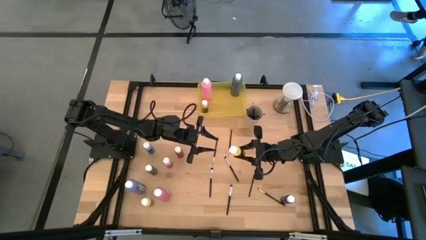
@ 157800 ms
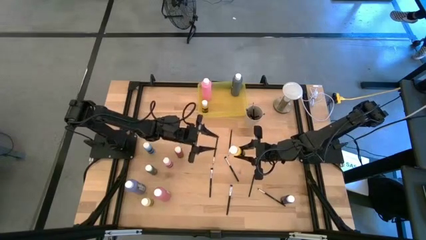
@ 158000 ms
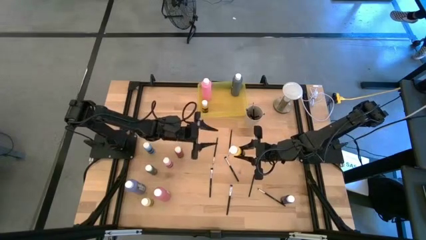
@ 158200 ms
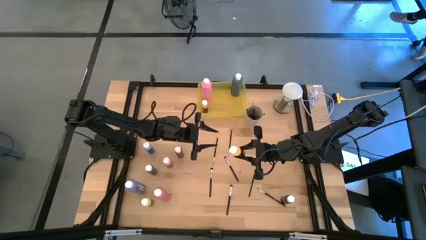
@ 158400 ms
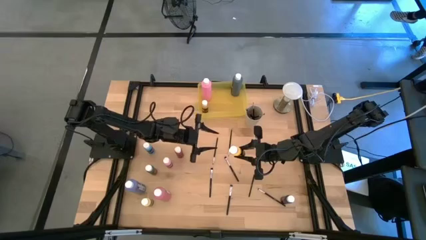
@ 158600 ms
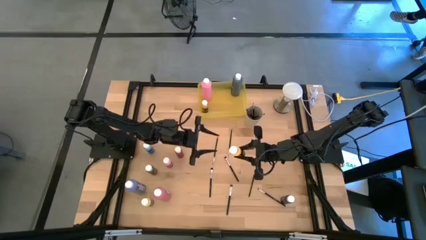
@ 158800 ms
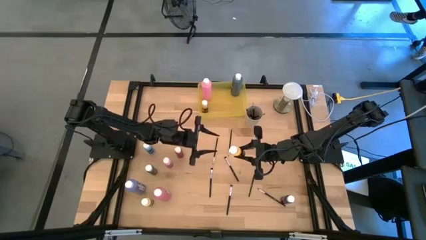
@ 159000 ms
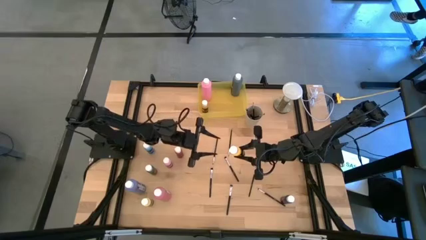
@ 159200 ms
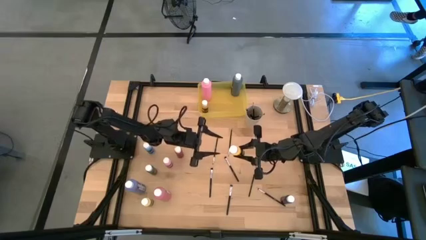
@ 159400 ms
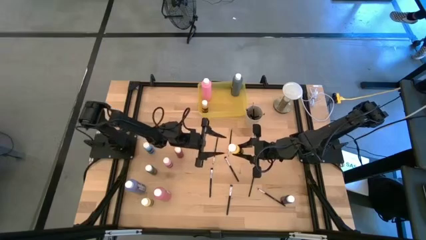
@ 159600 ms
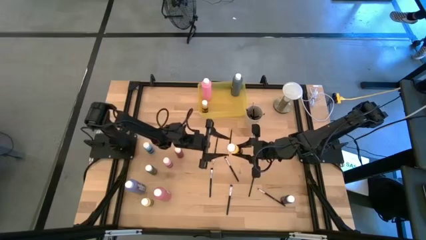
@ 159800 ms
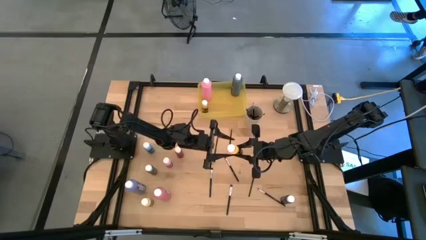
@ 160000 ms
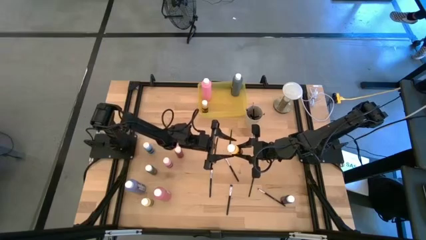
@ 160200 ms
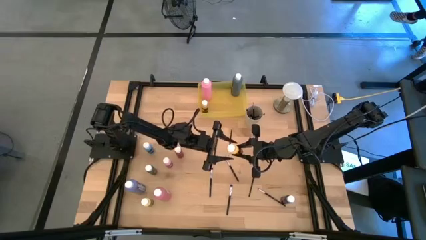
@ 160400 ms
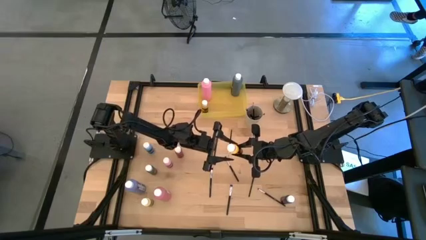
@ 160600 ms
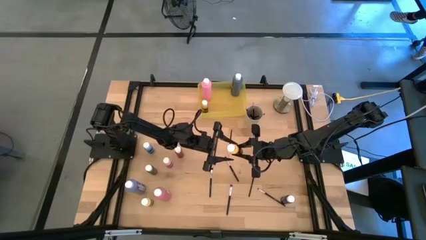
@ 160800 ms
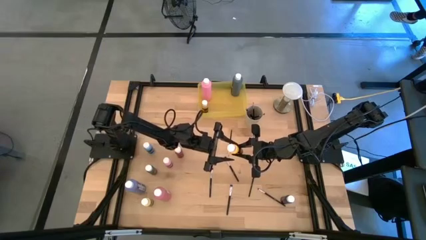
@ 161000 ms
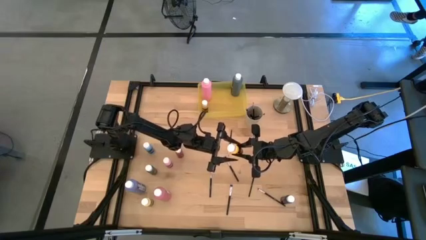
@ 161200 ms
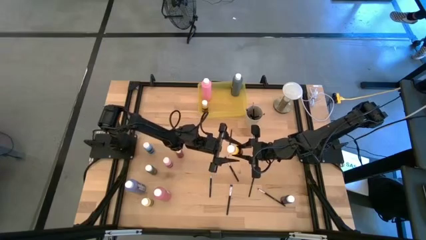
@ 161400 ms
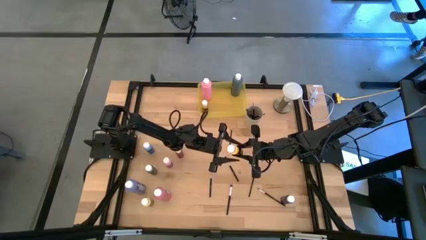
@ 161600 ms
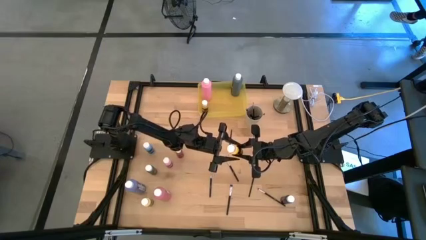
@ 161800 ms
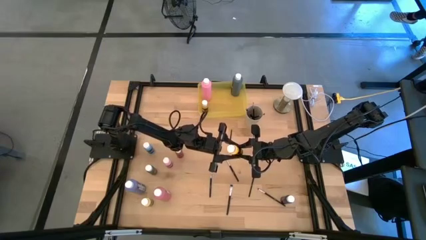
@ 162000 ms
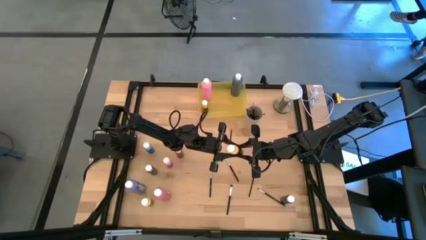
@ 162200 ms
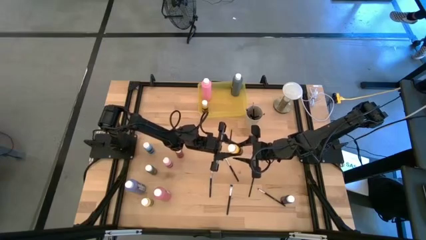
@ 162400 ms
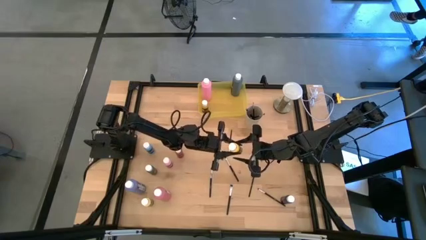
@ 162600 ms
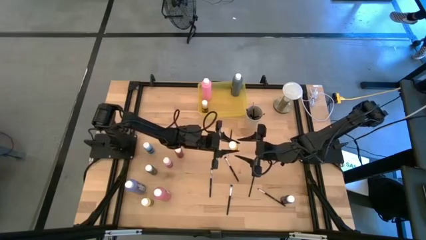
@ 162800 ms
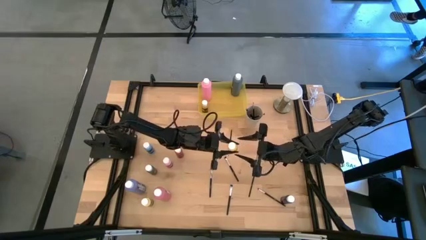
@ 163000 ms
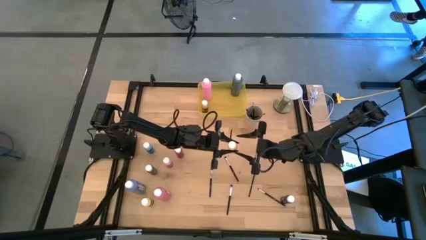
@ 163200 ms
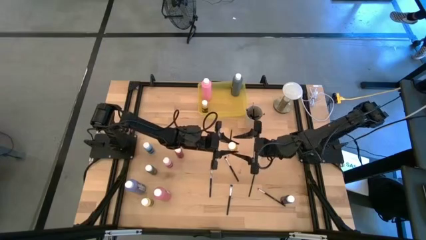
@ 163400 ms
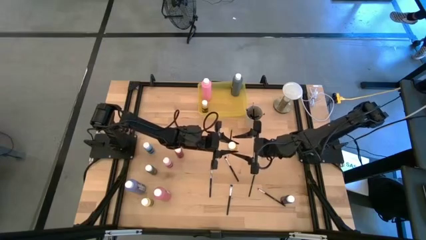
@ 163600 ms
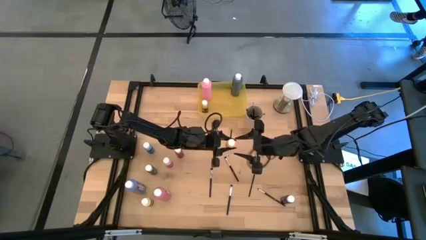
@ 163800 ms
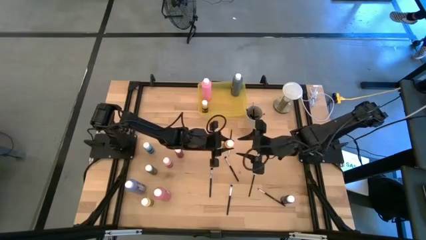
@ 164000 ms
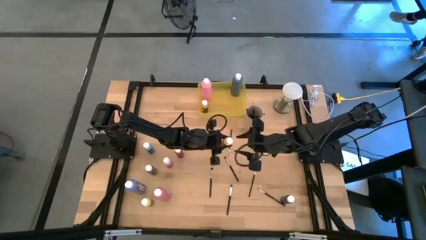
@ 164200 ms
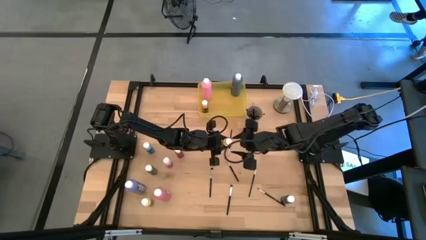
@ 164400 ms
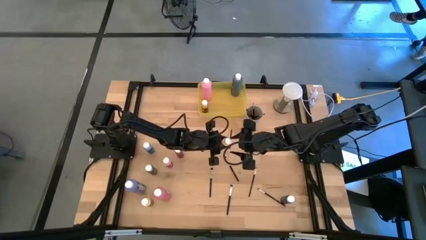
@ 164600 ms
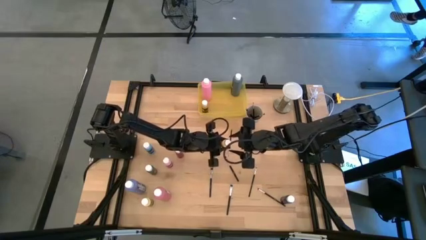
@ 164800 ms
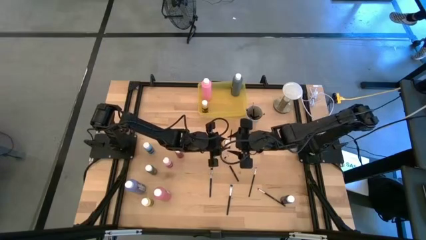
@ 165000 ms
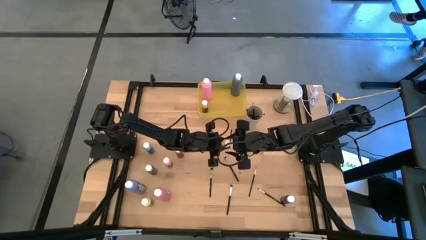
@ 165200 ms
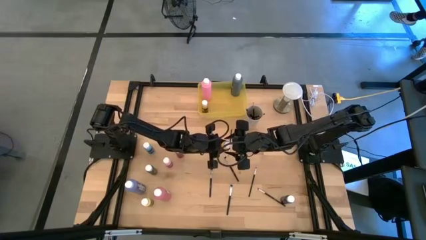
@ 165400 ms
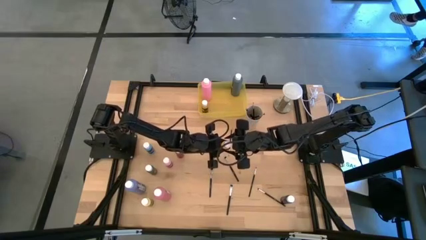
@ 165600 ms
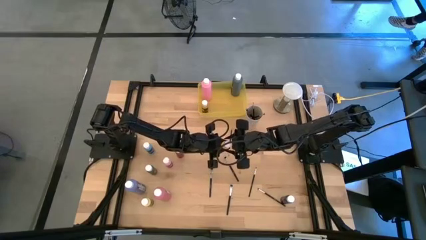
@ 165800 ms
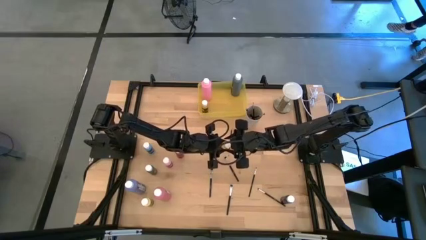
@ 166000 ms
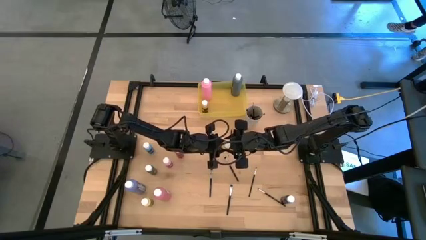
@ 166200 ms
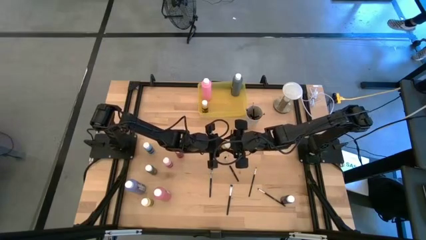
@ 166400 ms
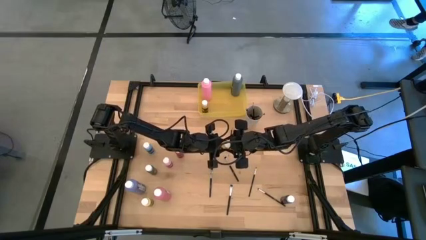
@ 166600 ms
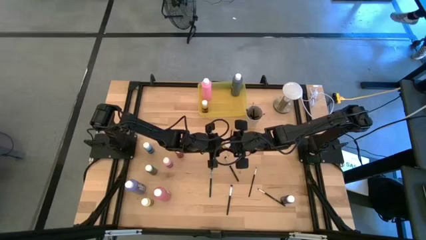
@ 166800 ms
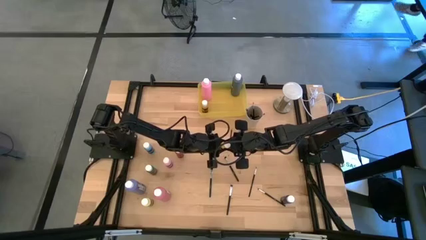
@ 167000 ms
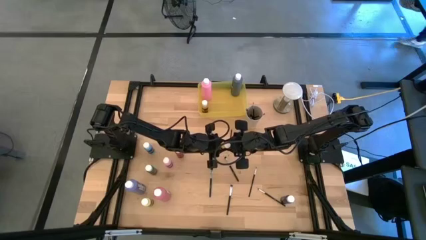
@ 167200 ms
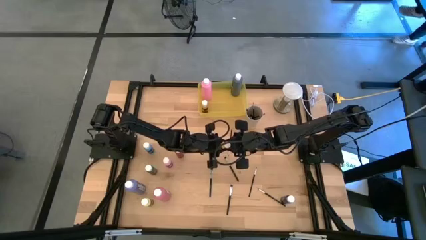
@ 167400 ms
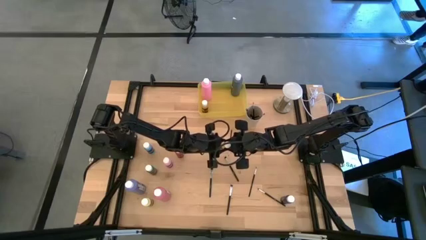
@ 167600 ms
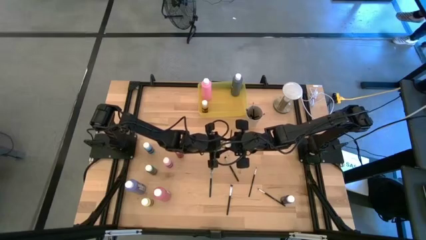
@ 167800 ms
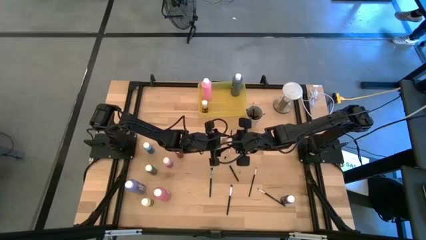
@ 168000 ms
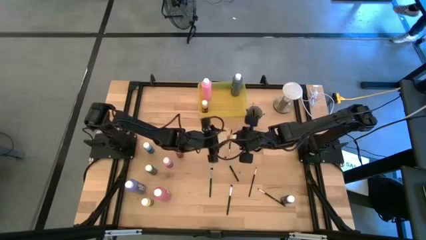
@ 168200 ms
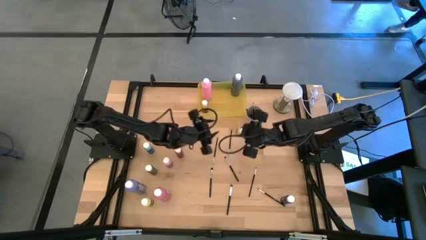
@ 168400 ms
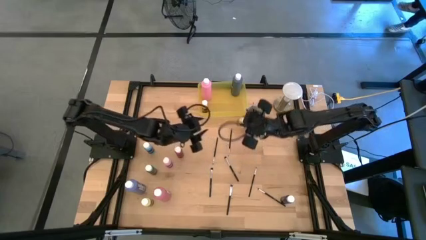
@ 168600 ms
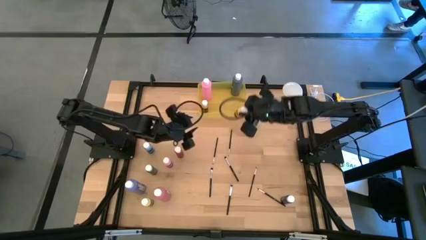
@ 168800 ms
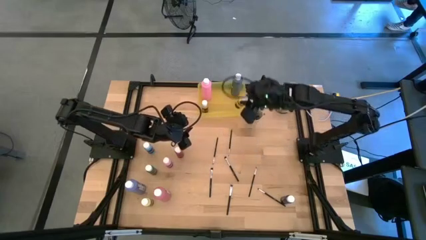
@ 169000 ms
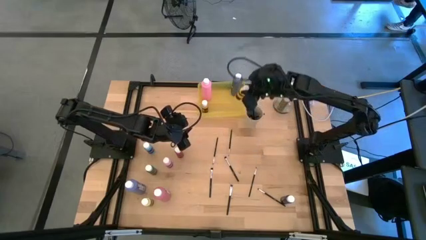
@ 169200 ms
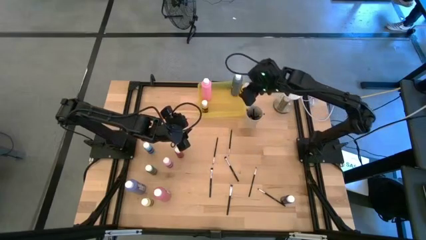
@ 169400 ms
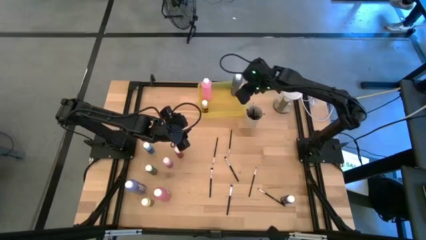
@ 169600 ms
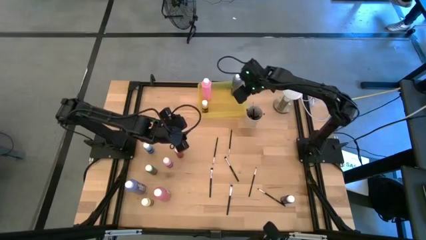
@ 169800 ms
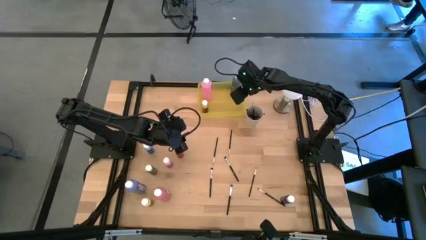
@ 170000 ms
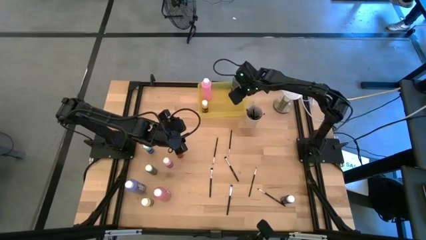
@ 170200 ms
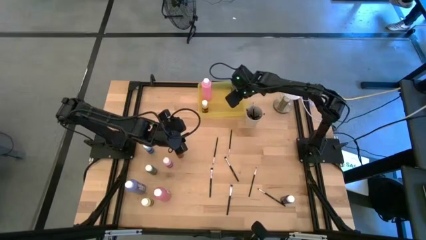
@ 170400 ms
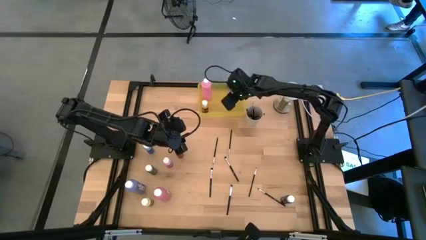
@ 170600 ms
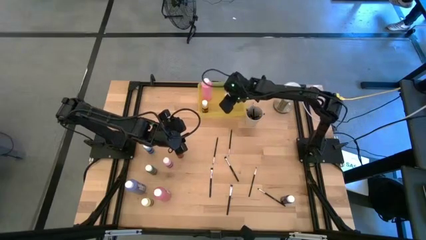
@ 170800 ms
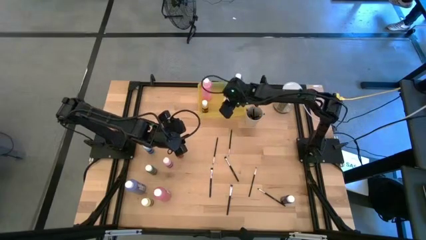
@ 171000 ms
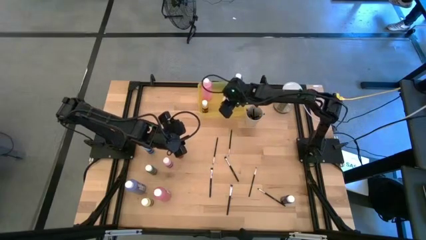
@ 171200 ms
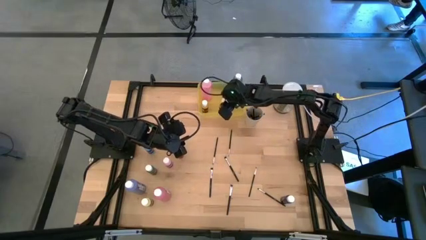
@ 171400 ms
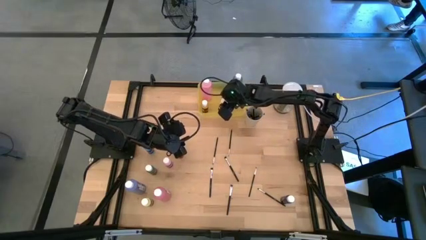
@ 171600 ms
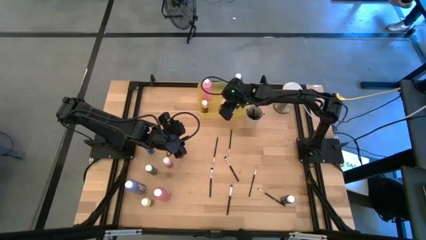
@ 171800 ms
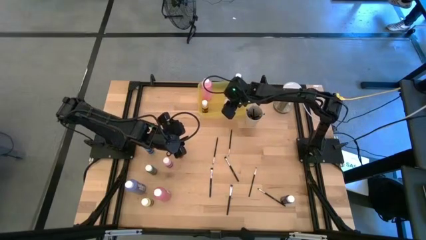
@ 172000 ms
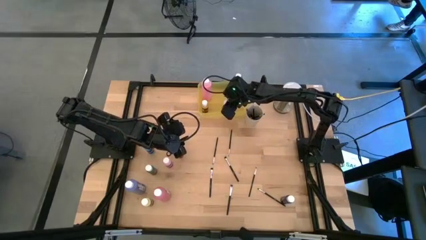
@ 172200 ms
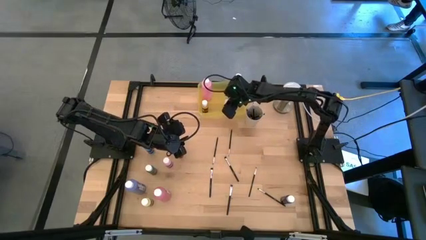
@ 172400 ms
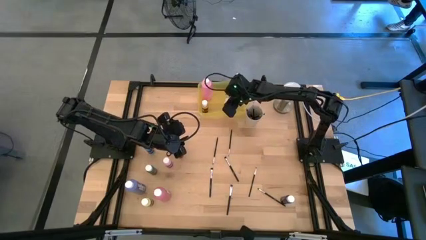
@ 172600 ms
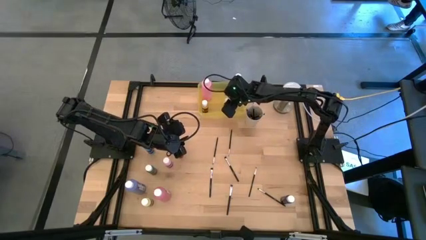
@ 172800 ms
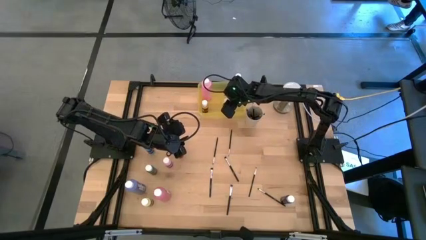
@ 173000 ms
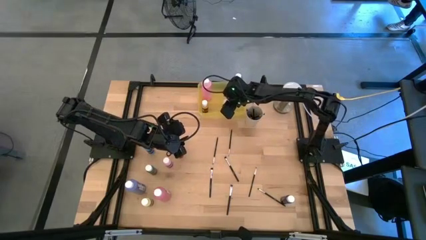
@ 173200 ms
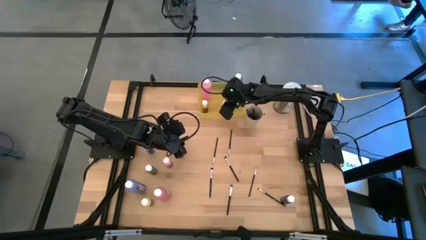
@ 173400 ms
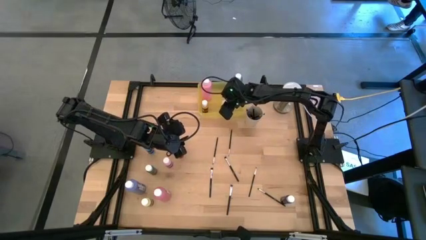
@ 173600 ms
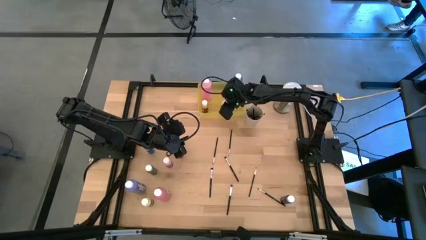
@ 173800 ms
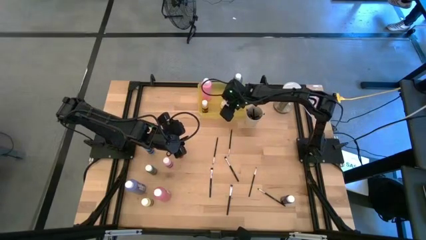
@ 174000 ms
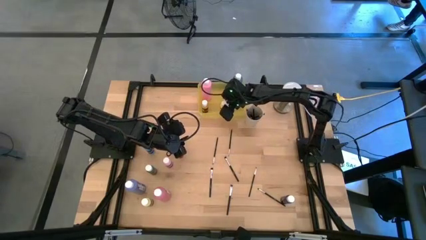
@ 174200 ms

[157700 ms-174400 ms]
Task: Pick & Place Paint Supplies
Put the small yellow paint bottle into the yellow bin
